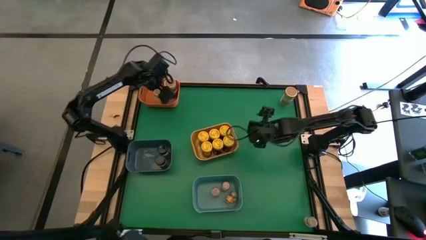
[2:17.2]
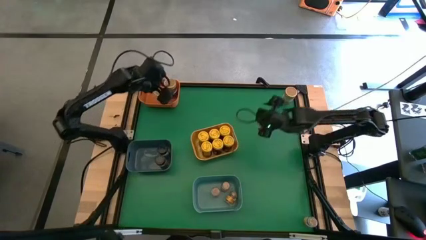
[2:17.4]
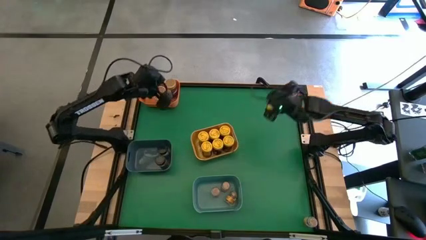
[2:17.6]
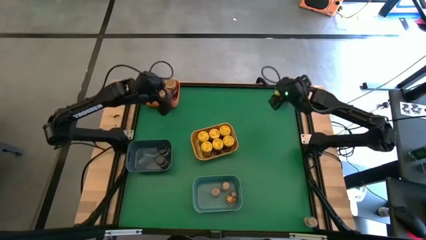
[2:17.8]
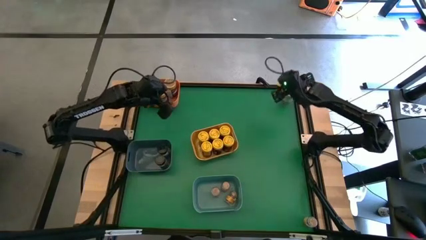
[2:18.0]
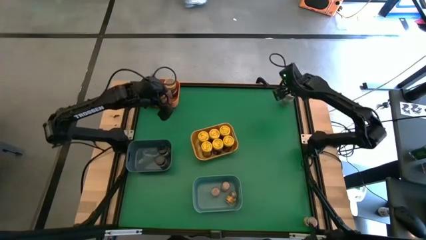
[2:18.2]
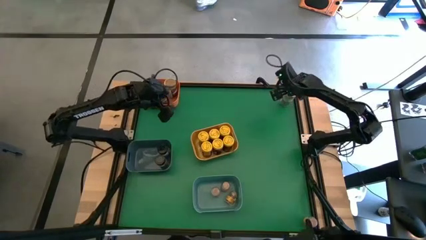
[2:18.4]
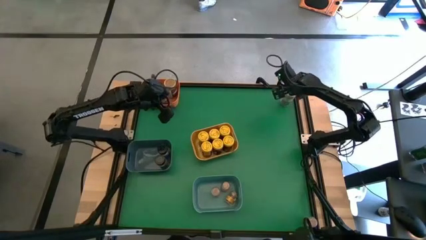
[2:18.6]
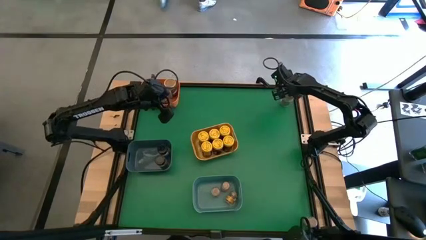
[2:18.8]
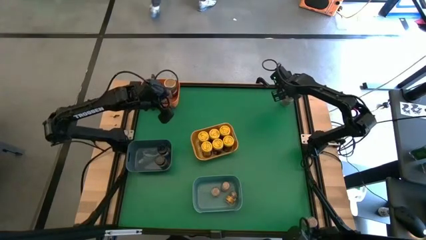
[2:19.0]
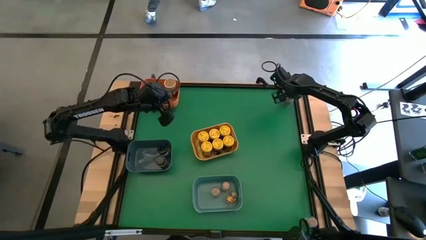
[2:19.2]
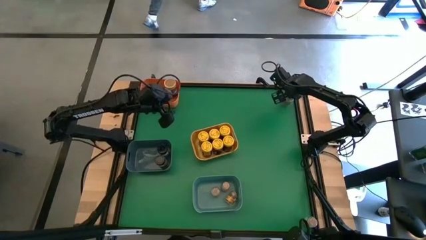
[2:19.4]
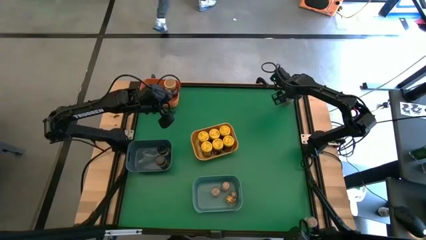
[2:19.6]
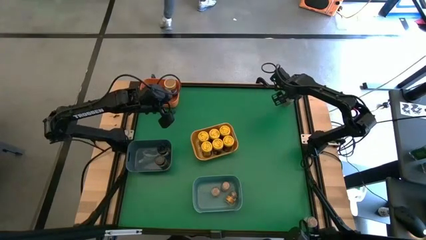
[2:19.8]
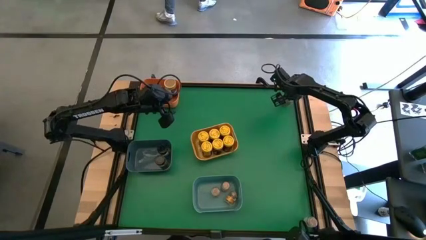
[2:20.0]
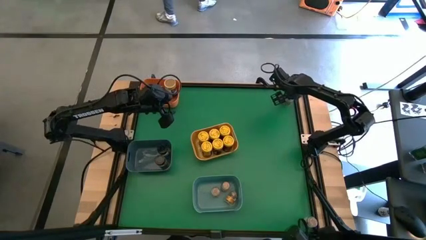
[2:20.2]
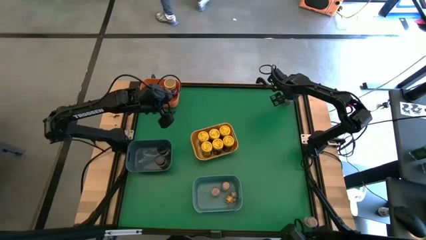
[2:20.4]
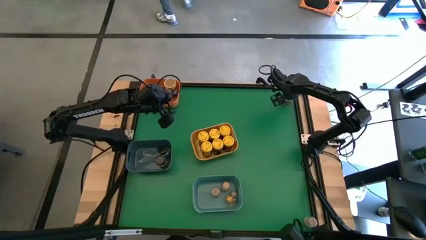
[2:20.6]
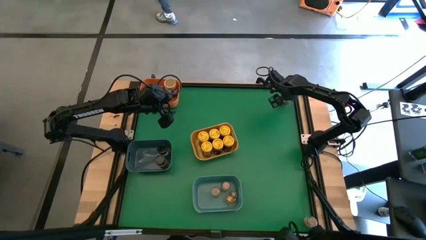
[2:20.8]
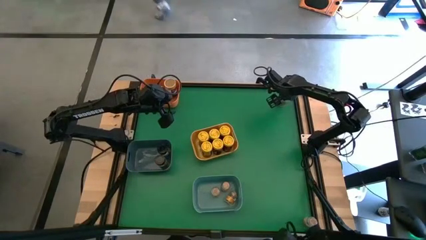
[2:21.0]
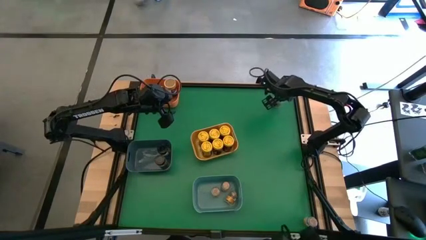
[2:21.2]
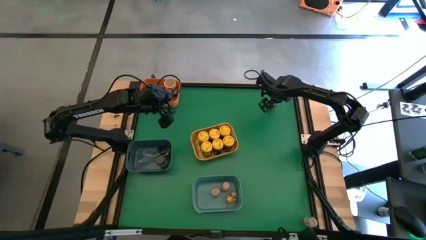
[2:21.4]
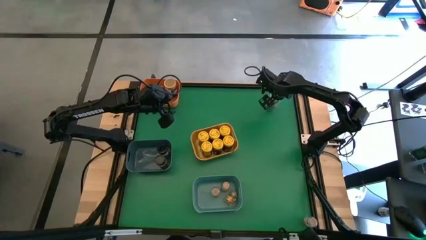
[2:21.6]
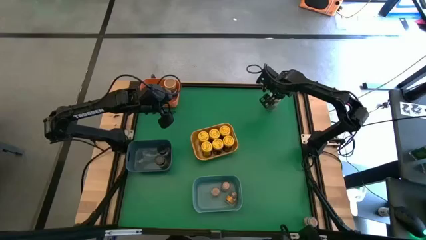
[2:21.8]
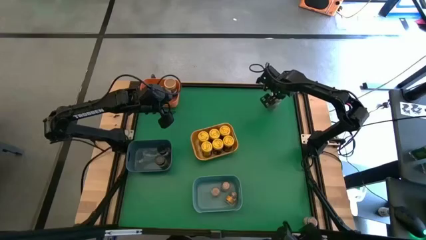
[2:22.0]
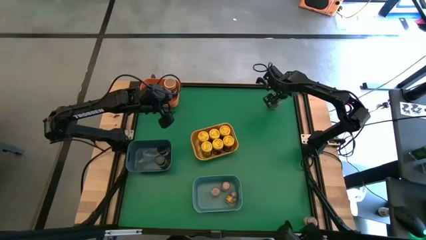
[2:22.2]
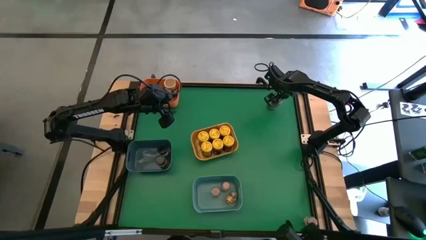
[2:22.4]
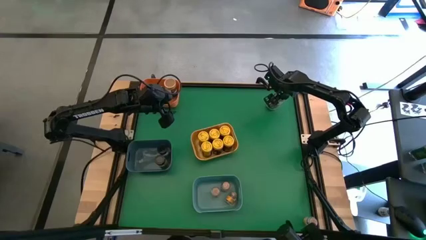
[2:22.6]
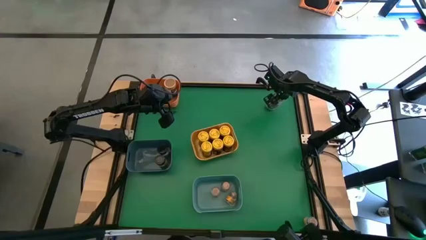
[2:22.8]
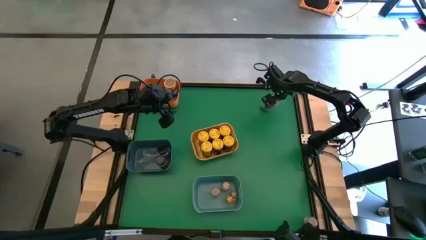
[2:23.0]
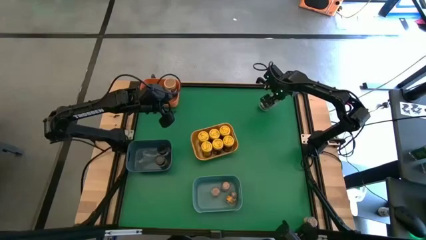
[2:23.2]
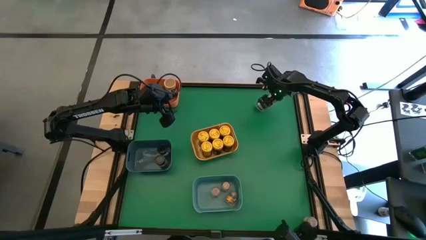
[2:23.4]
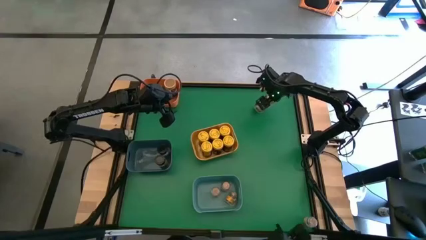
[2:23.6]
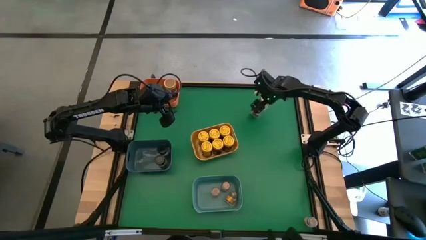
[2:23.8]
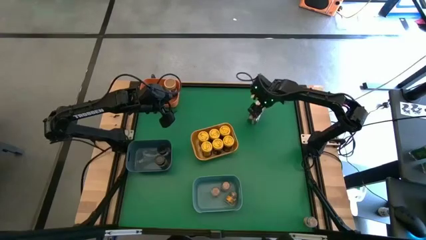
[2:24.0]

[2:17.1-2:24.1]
Task: Sort spices by type
Put the brown seasoning bottle into the orange bin

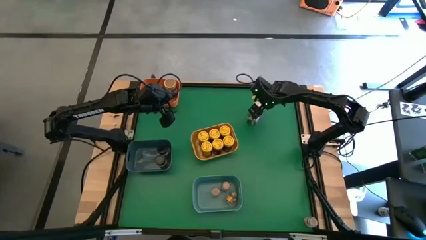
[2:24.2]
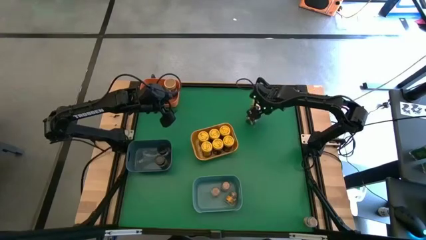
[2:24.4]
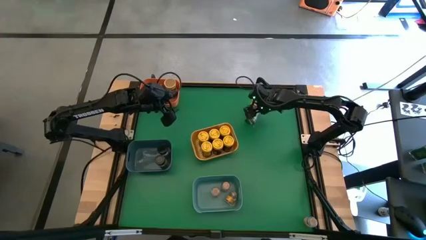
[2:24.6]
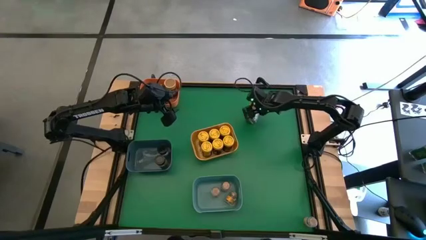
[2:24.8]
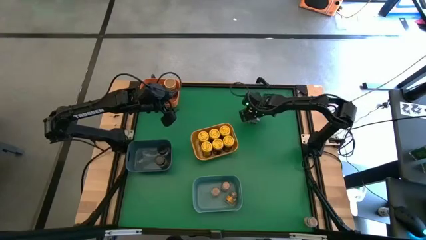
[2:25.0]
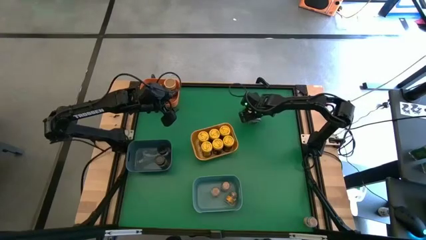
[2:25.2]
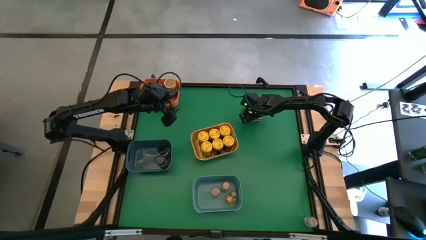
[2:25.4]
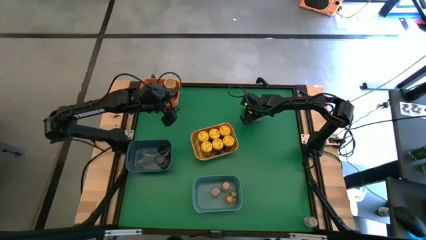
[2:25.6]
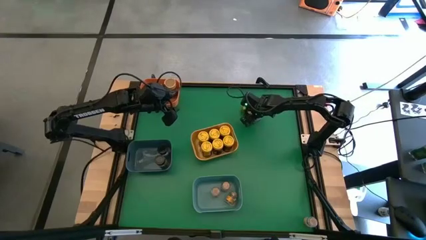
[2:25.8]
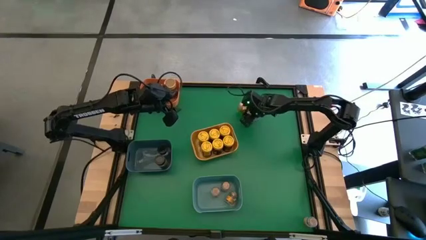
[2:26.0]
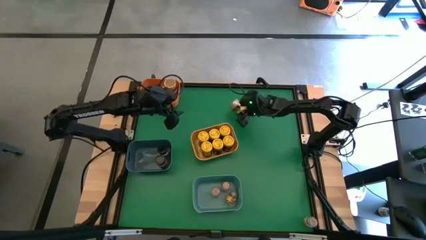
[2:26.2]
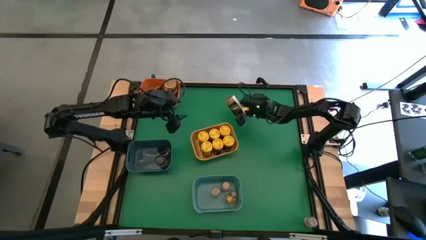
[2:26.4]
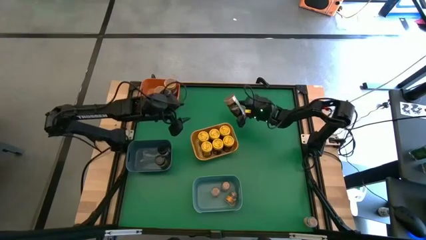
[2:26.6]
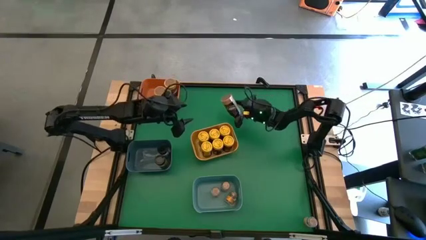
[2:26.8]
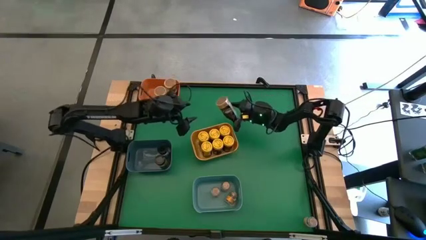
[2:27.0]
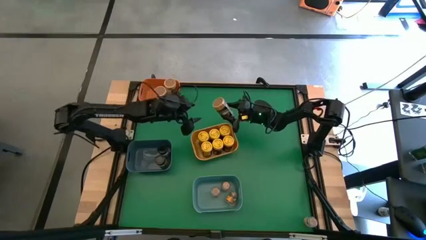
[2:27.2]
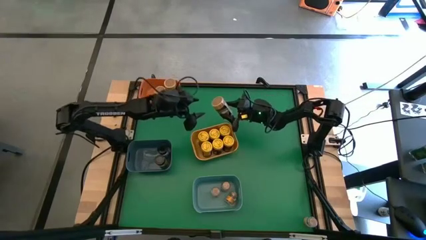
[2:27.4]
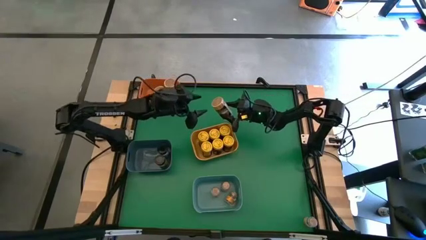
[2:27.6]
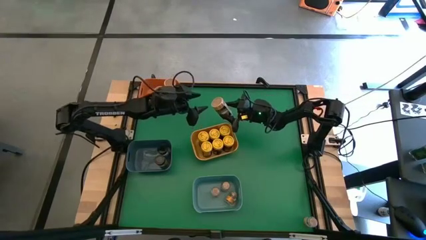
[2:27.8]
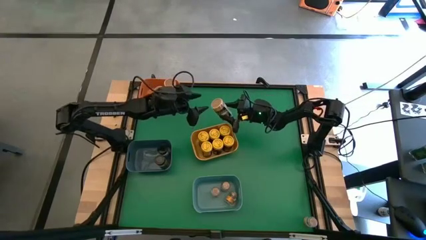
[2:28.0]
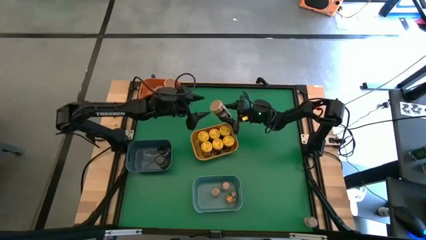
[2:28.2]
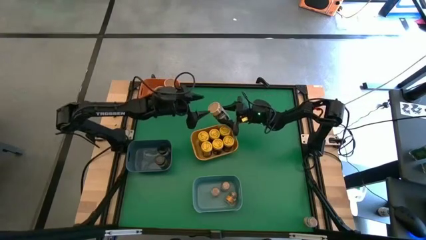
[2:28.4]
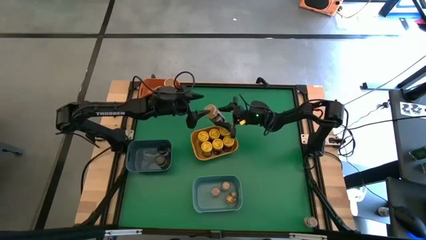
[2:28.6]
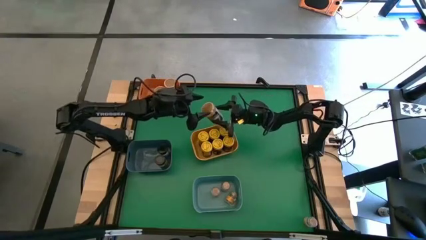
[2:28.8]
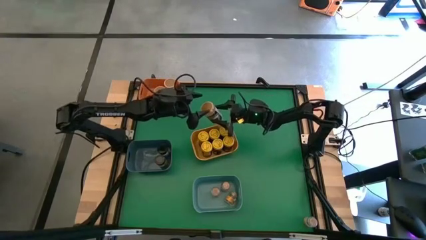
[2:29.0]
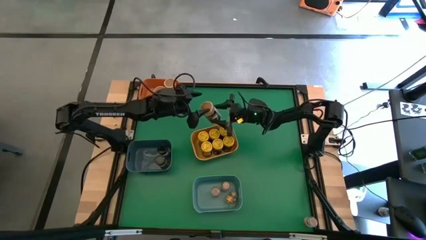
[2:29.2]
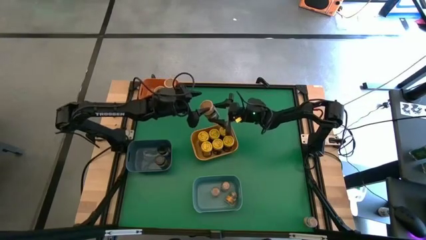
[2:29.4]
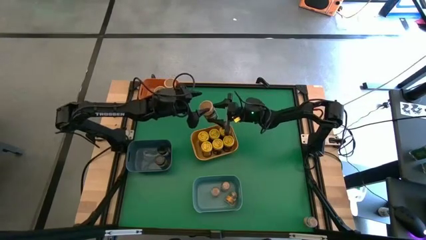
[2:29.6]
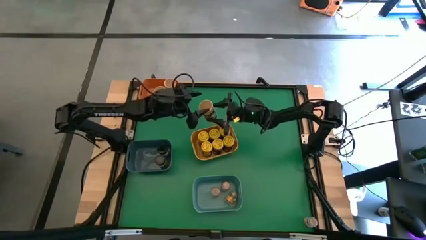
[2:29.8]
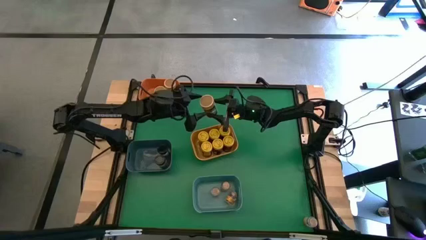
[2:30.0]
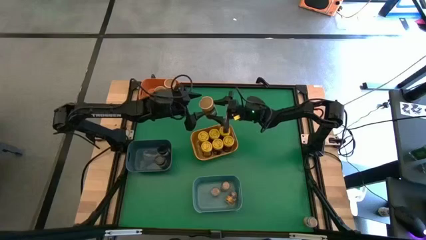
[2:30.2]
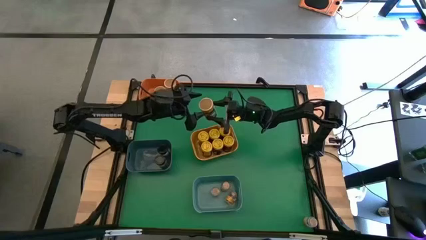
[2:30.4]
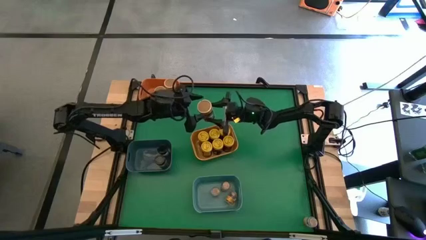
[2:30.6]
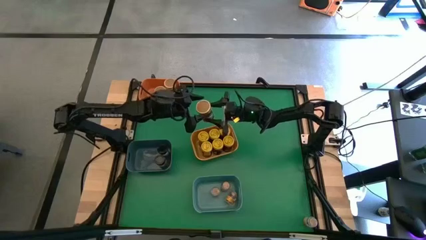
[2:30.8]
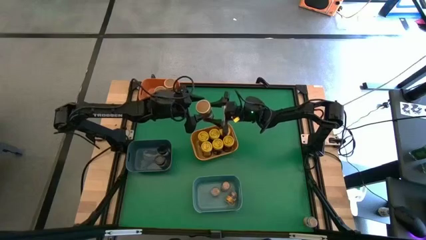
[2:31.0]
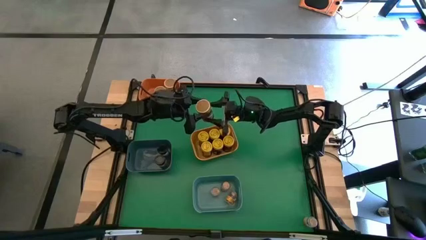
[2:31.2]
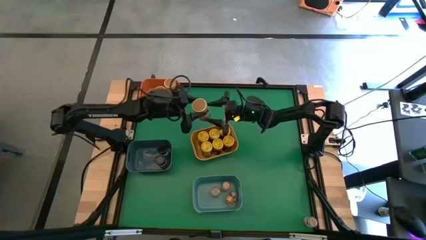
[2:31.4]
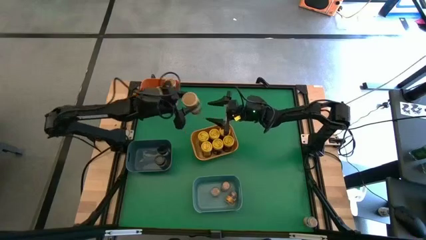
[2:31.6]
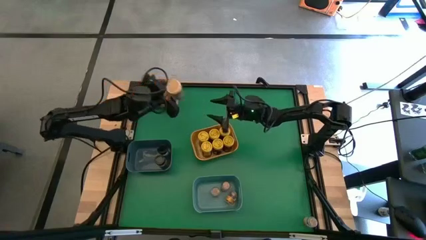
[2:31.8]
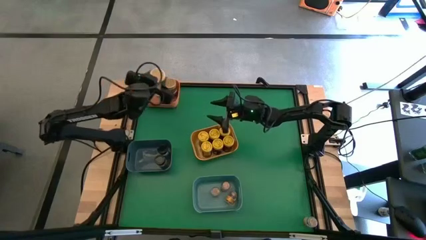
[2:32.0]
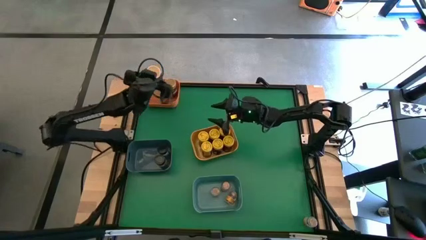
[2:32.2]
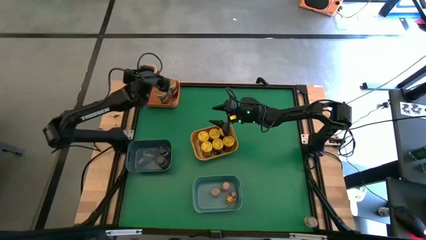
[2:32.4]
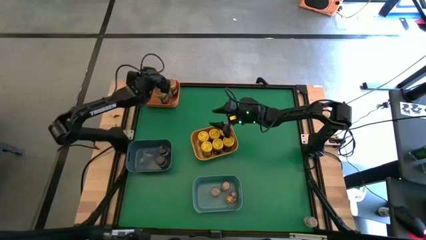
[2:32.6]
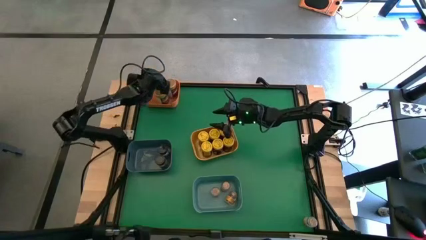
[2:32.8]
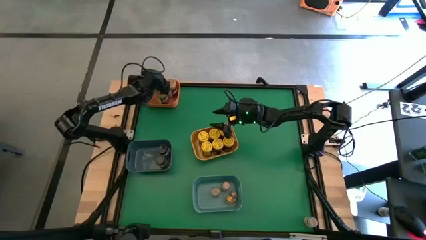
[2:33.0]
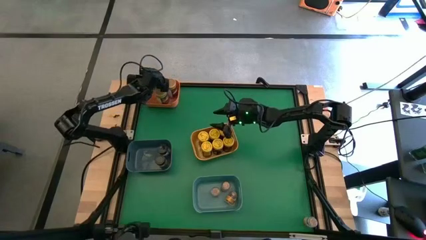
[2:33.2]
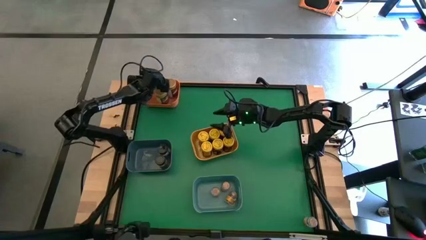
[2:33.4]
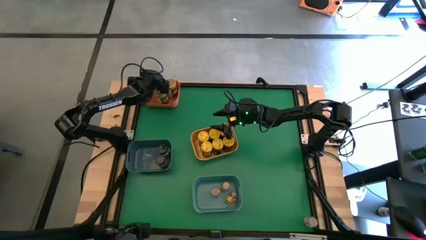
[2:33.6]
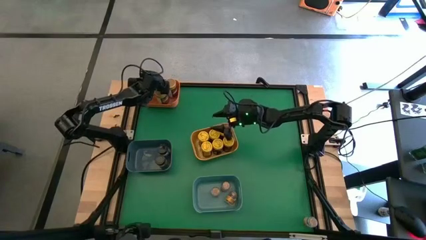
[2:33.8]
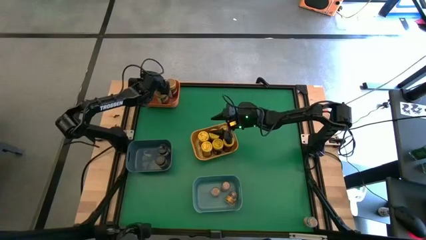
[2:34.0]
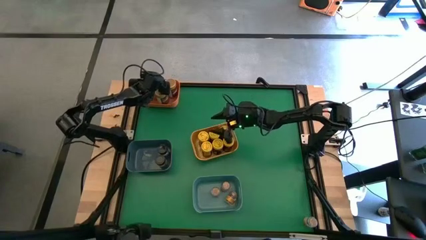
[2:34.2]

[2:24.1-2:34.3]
Put the brown seasoning bottle into the orange bin
